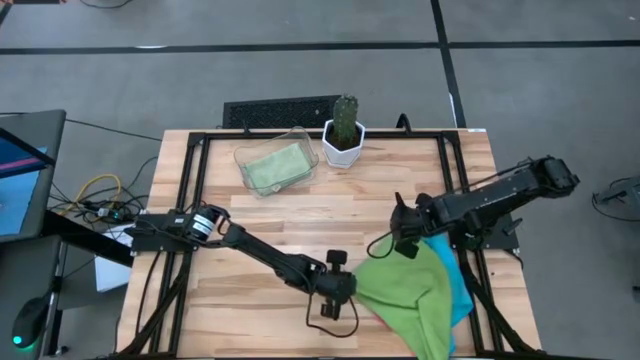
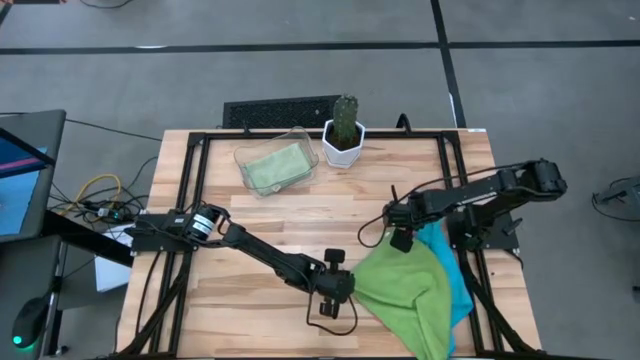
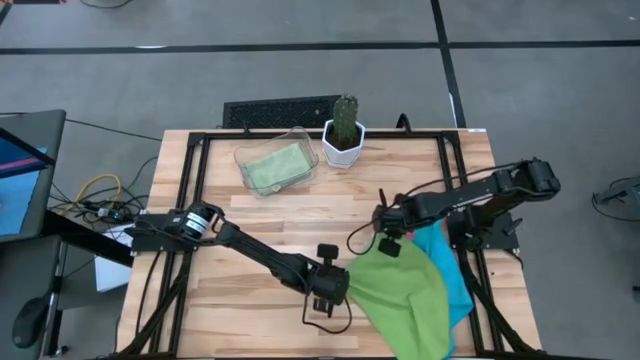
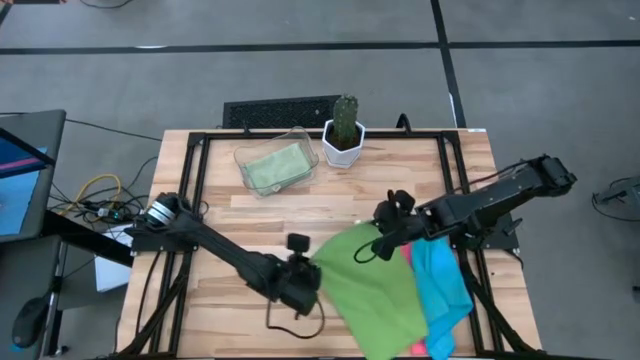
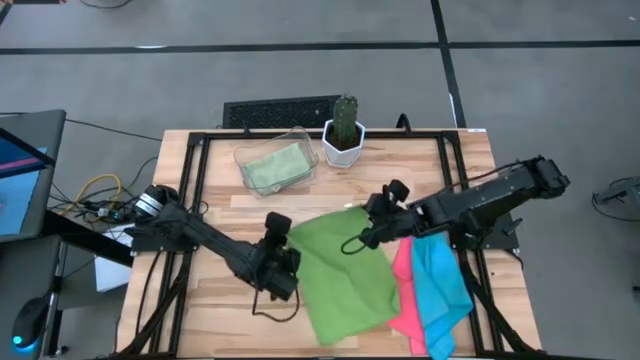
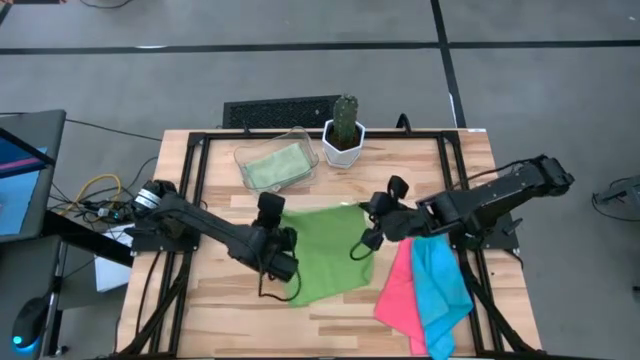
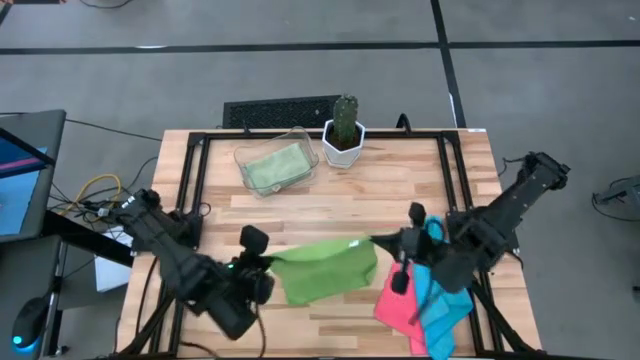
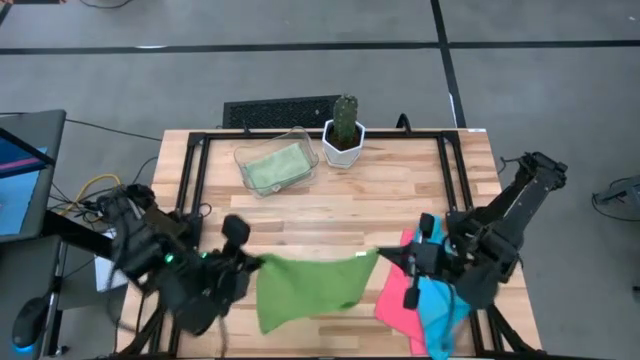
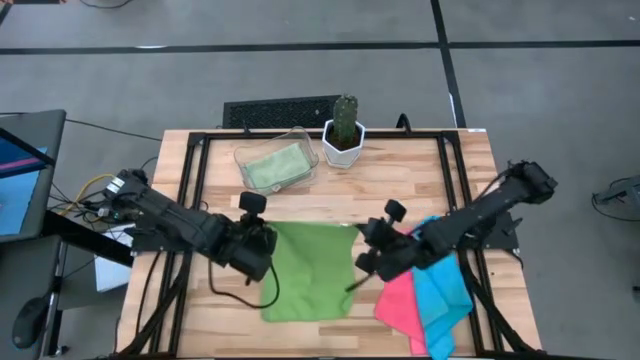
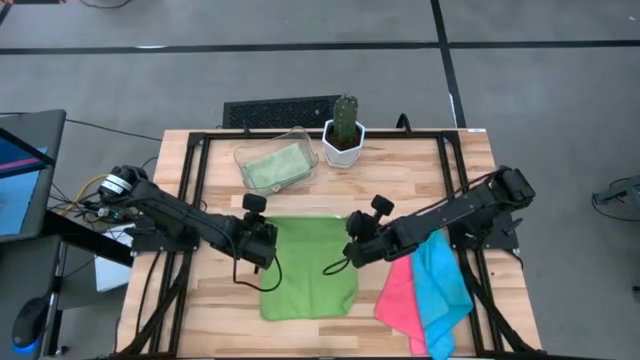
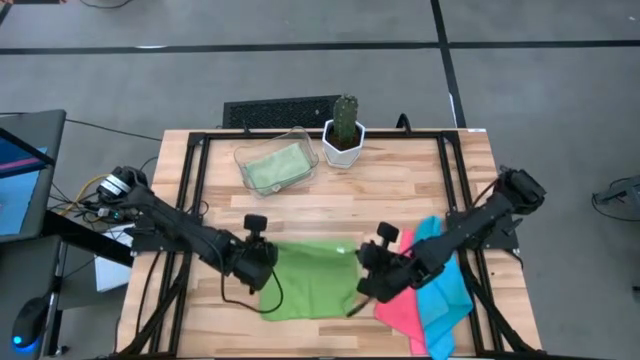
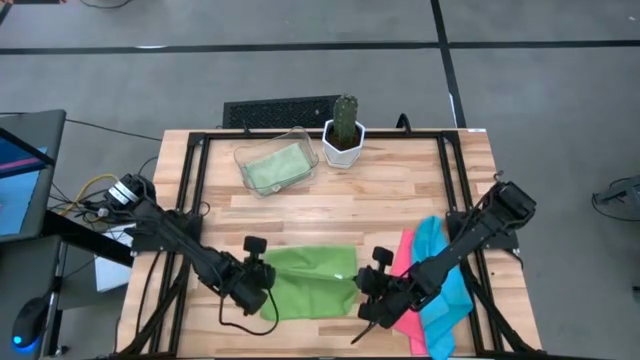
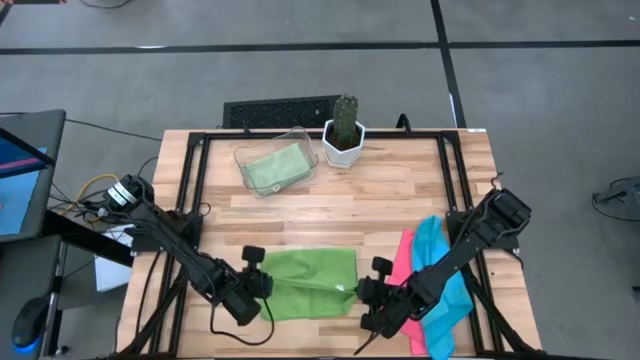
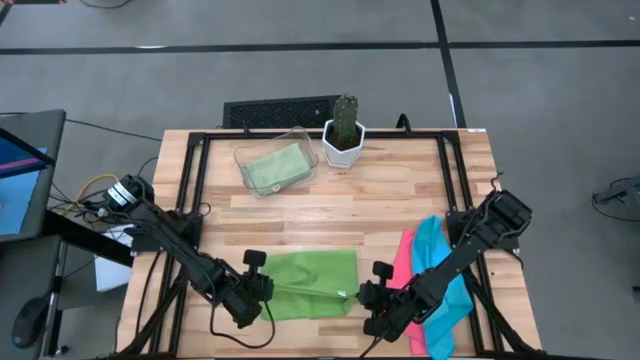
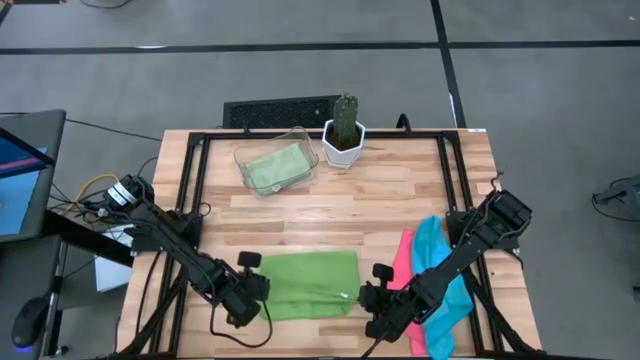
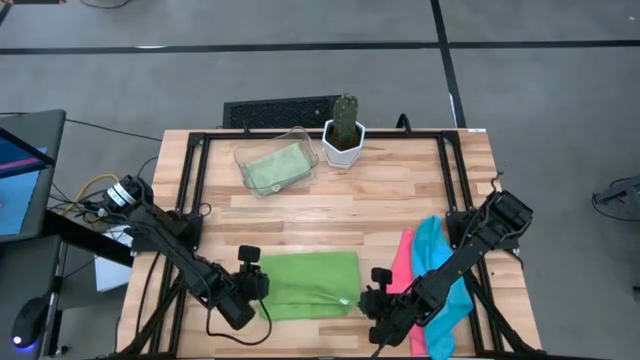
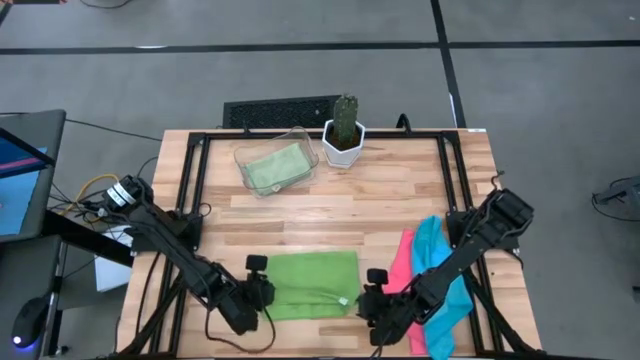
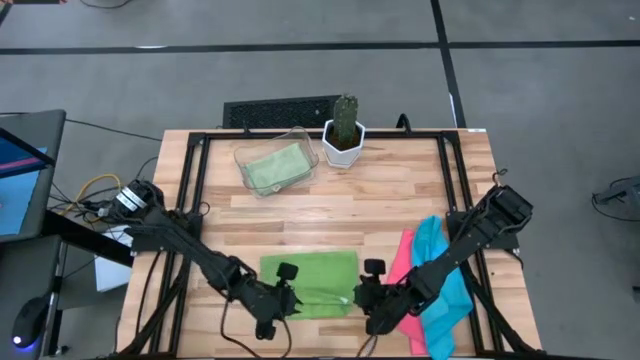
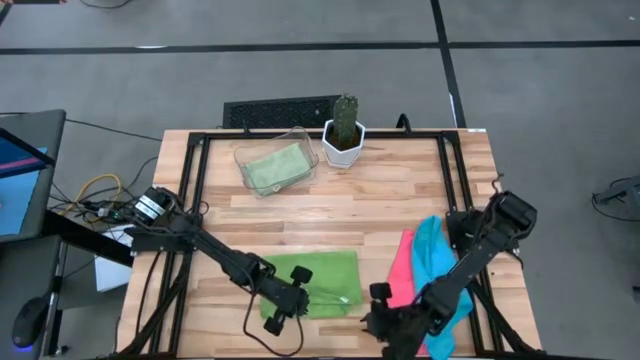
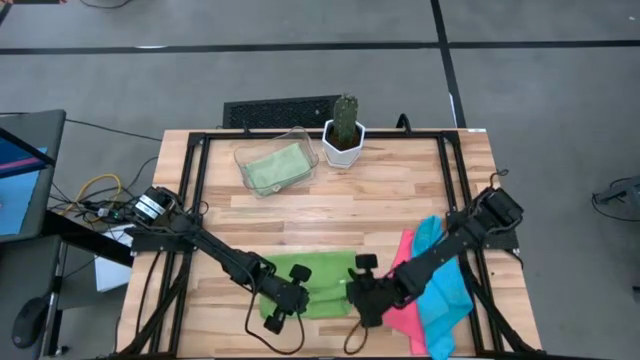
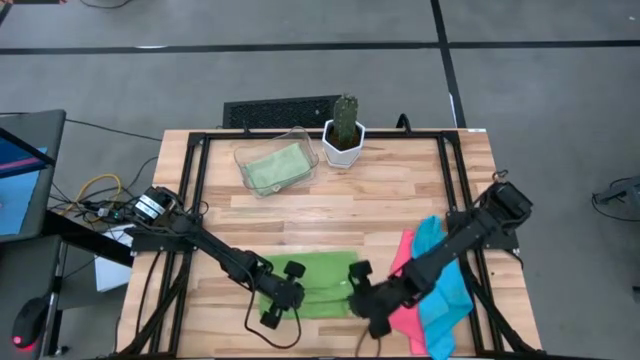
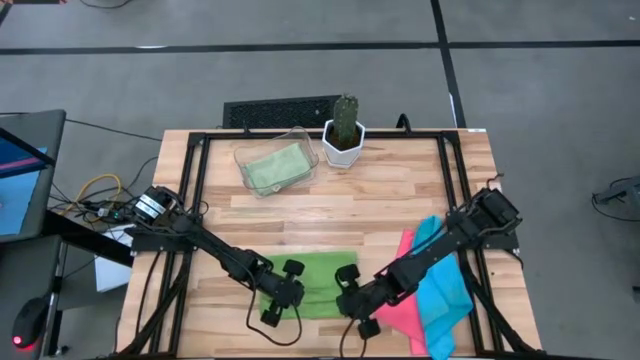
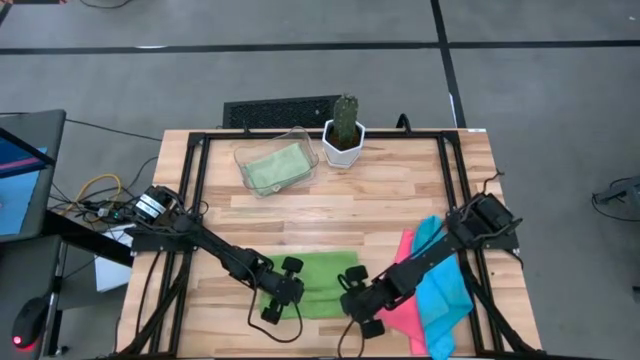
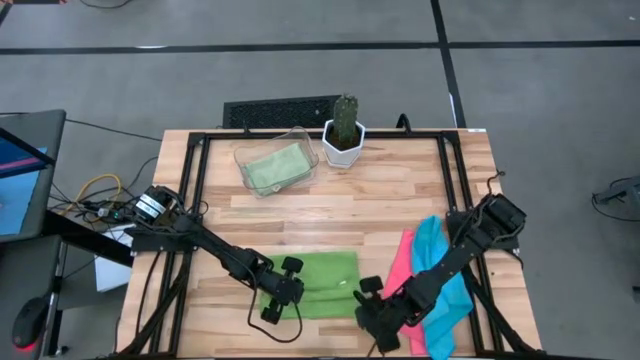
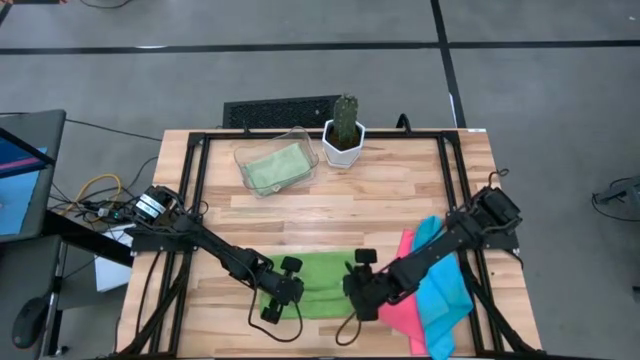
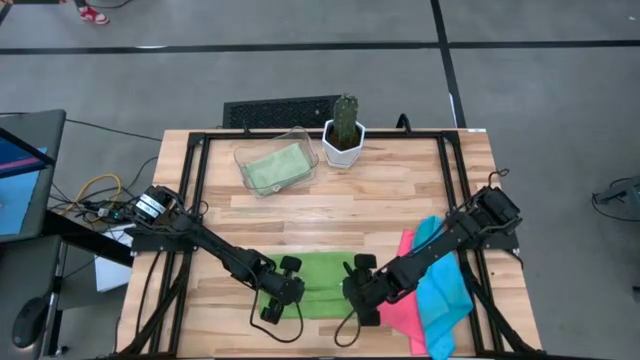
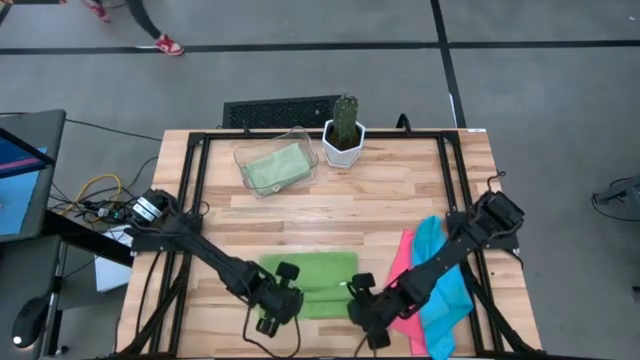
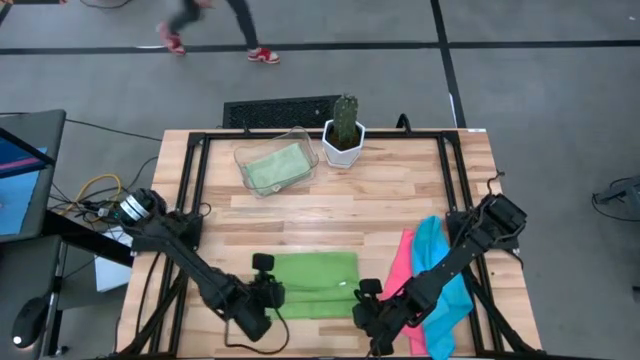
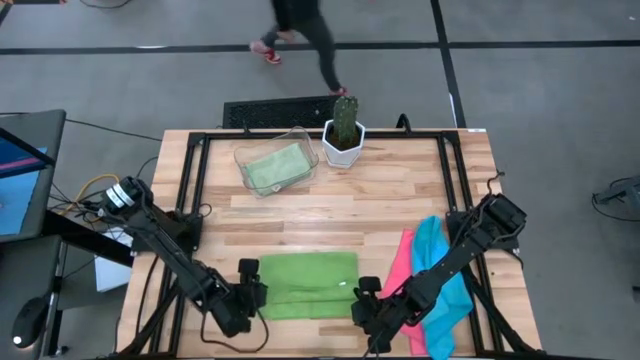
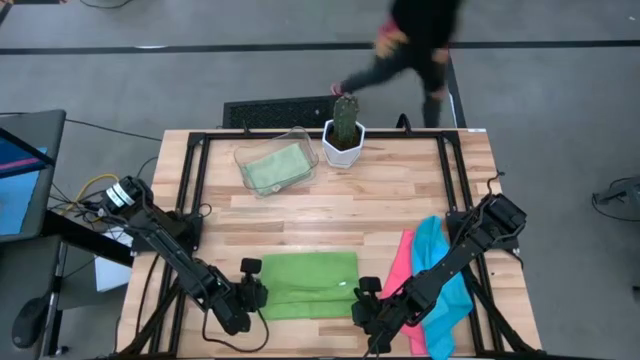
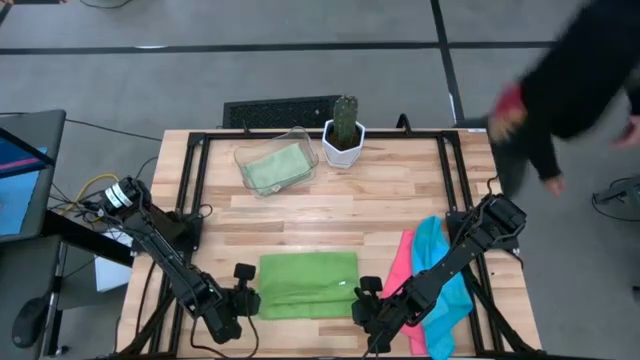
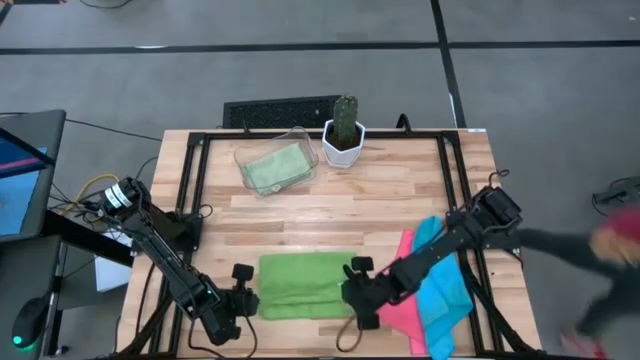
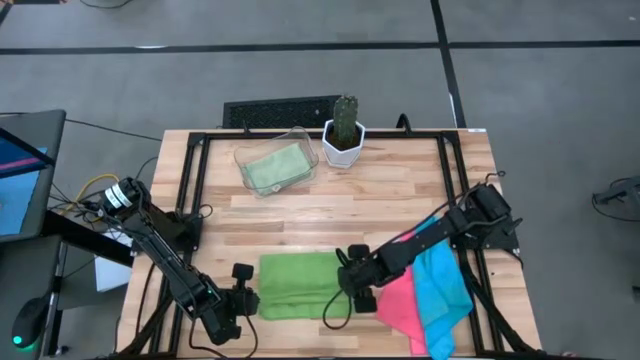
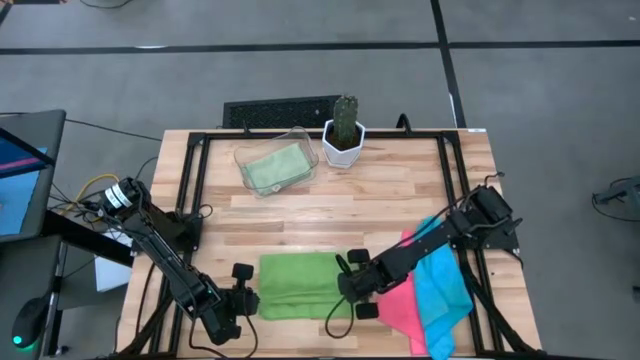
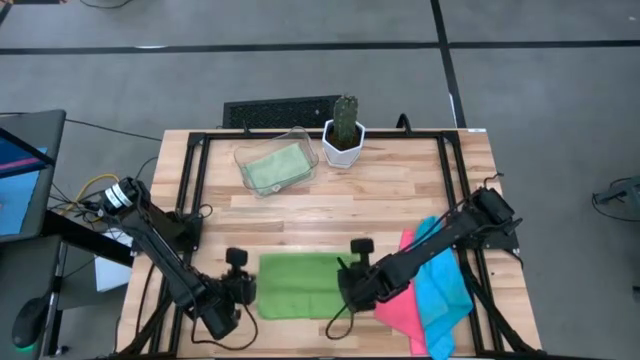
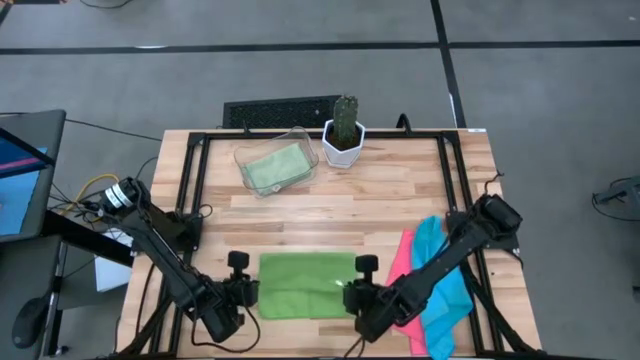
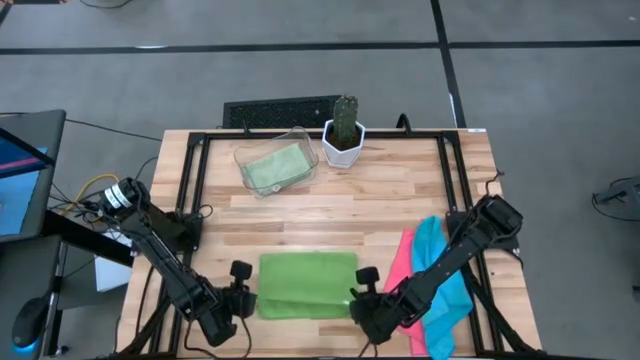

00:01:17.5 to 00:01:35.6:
Task: Fold microfiber towels
Fold the green microfiber towel

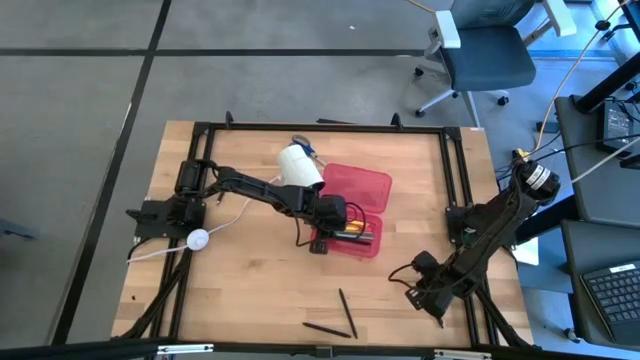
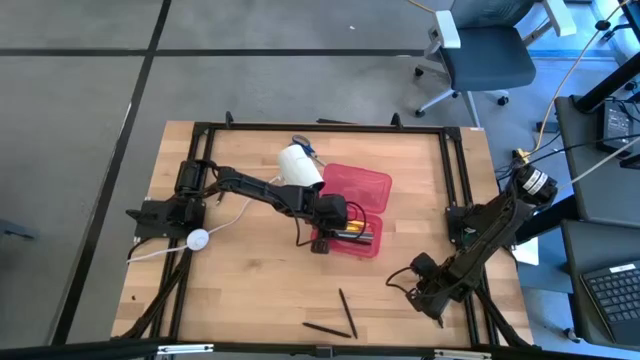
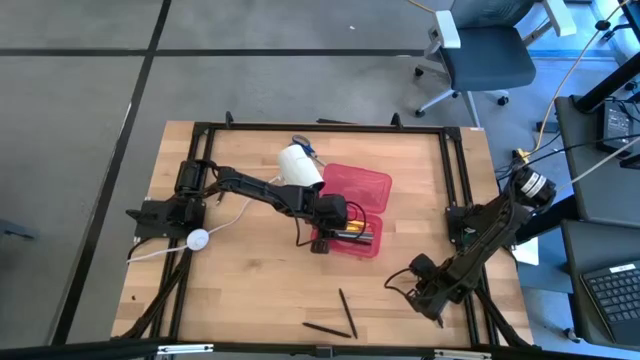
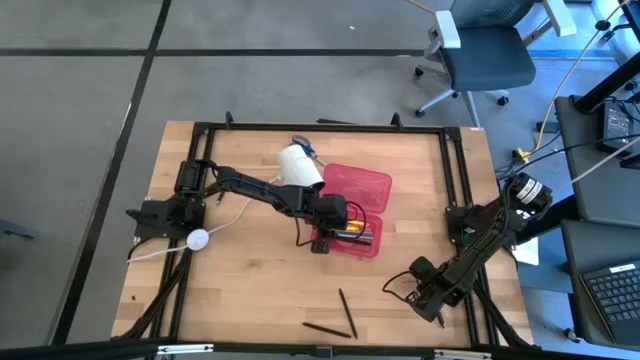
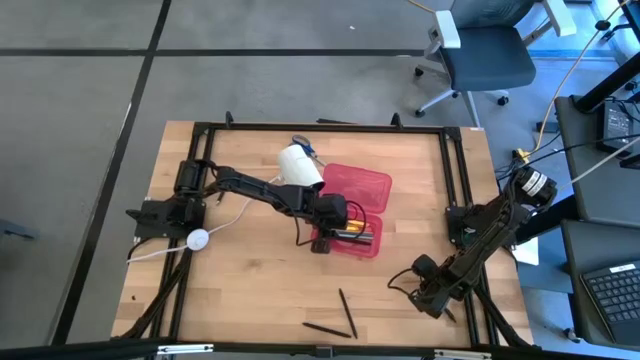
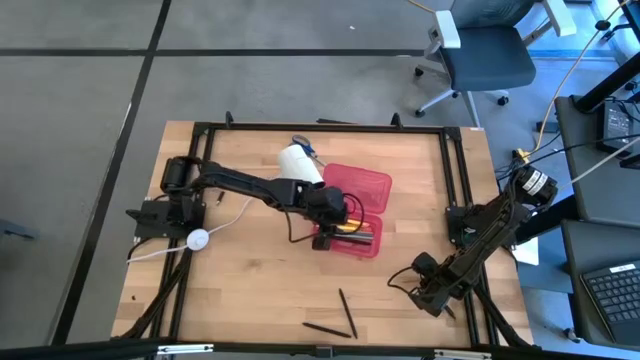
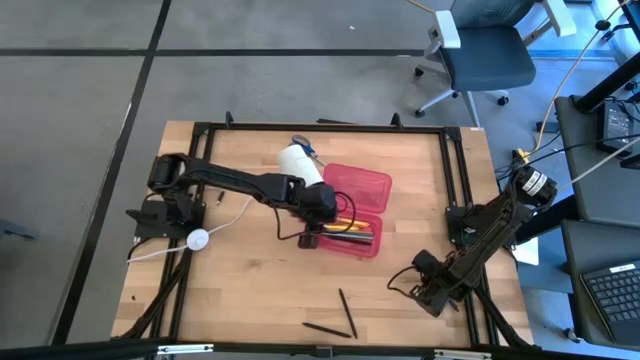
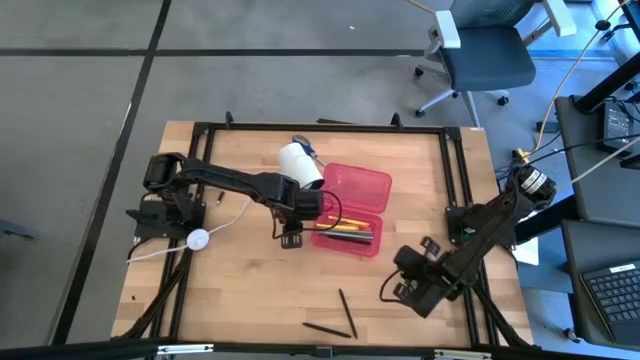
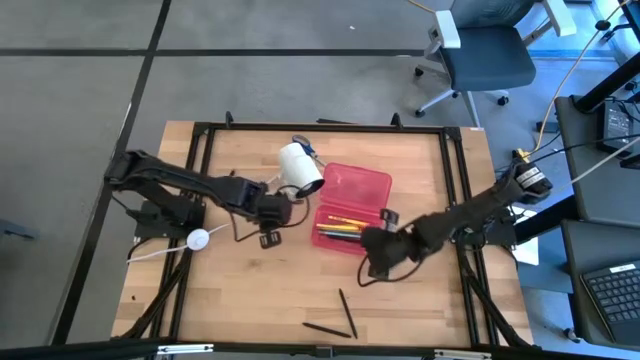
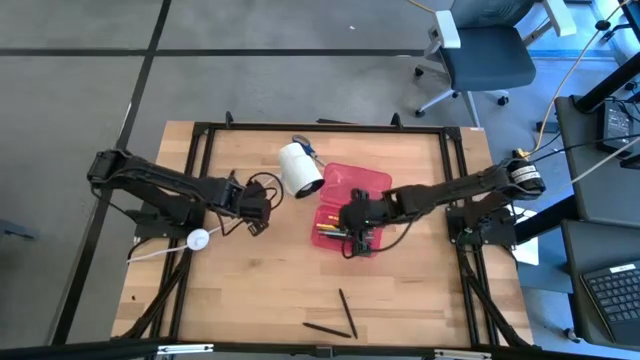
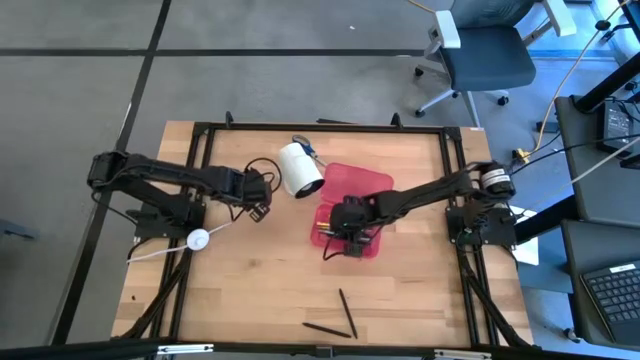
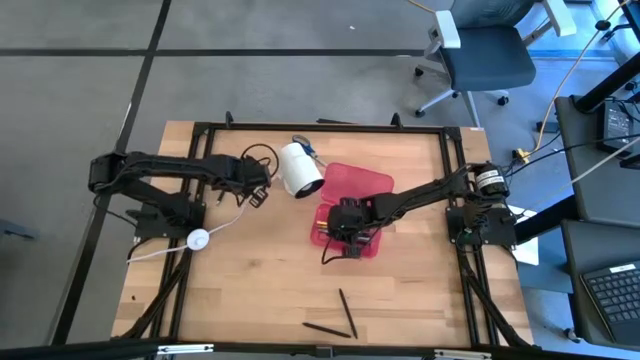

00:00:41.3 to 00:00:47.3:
Task: Pick & place school supplies into a supply box
Put the black pen into the pink supply box
